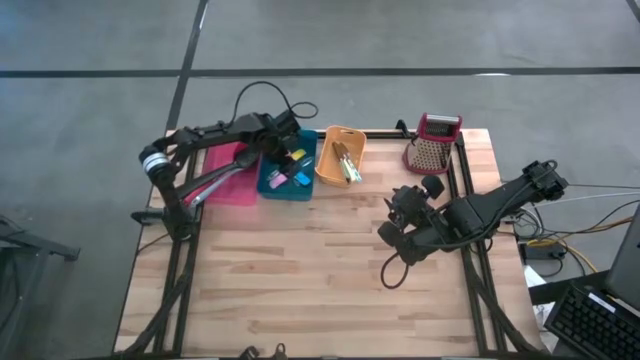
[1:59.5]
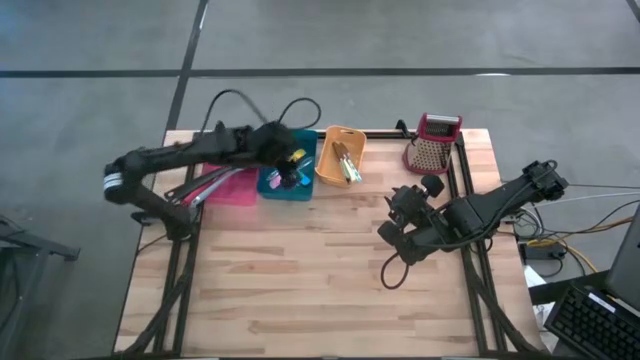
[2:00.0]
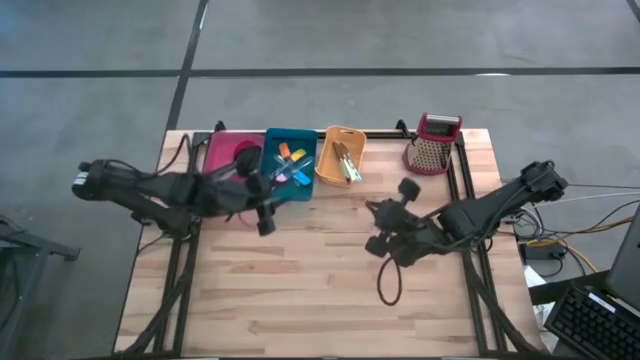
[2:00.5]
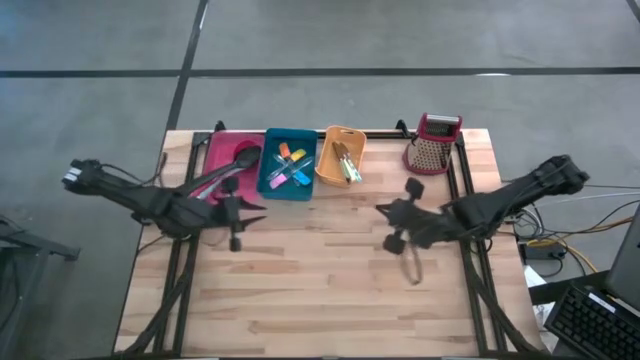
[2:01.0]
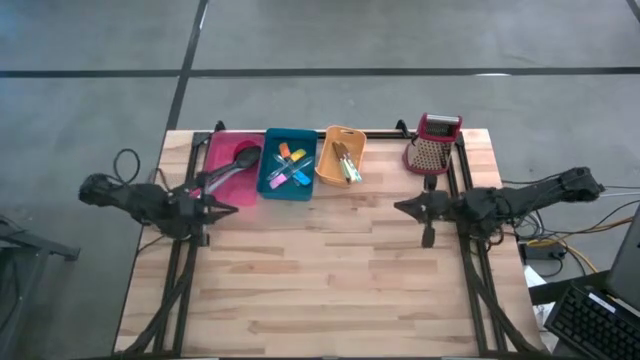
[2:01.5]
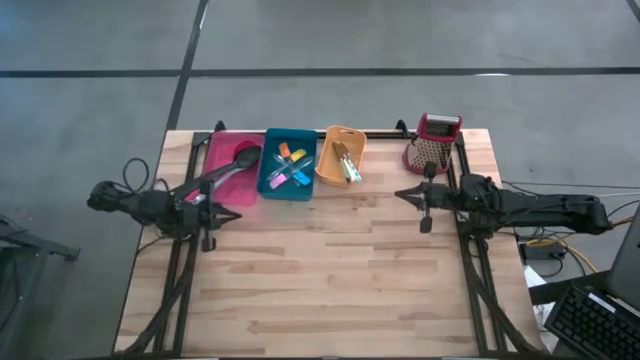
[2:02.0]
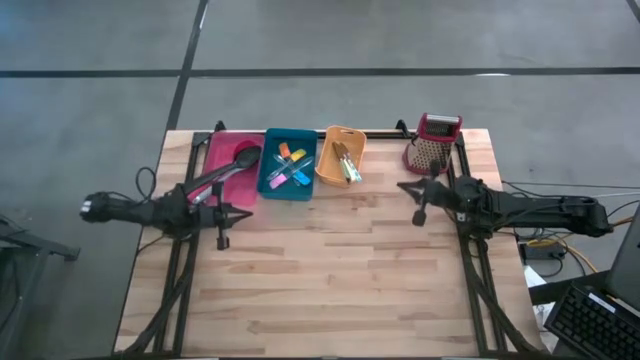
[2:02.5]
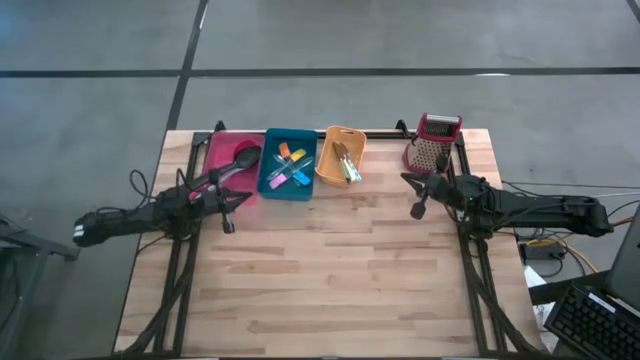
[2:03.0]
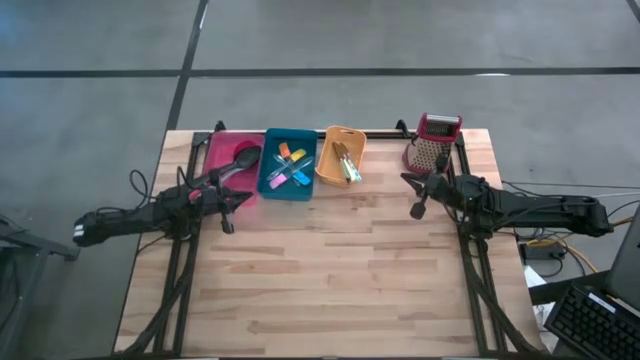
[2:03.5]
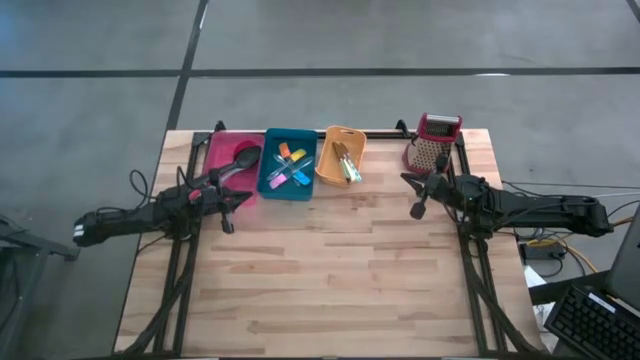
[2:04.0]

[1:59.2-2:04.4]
Task: Pick & Place Kitchen Items
Return to Home Position

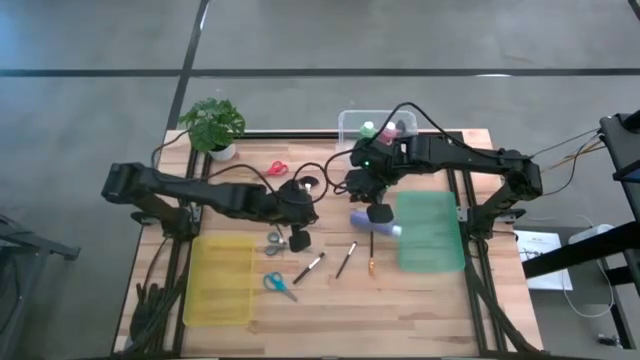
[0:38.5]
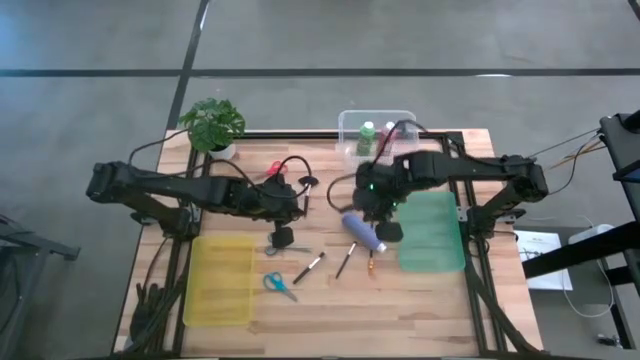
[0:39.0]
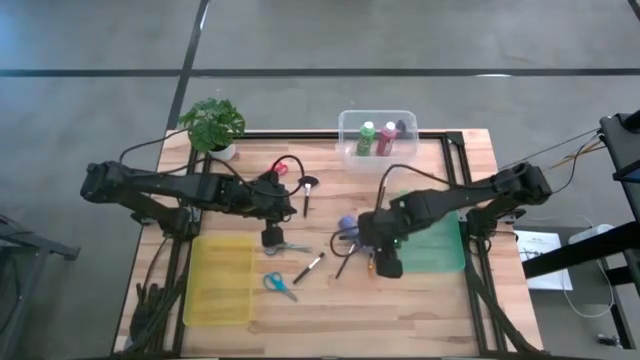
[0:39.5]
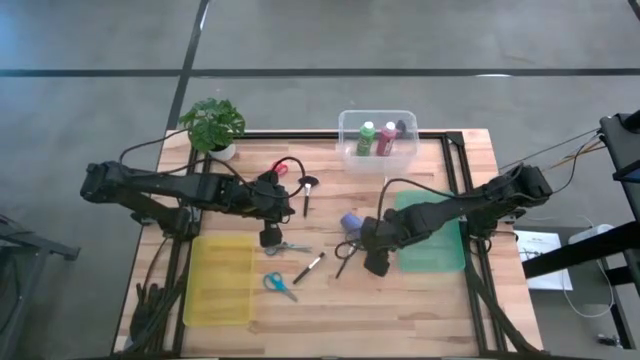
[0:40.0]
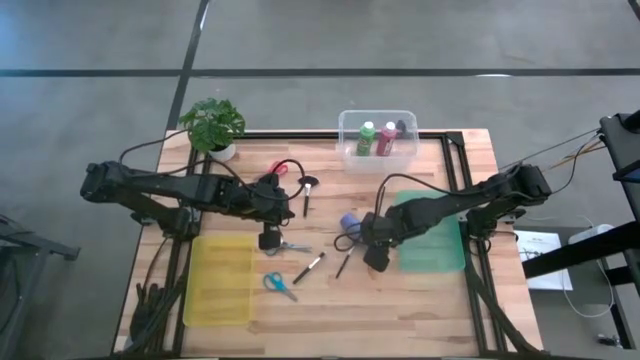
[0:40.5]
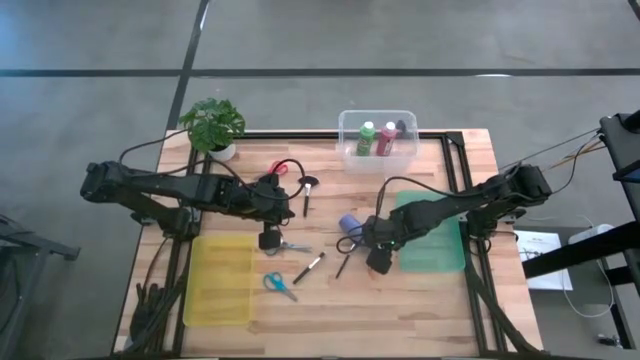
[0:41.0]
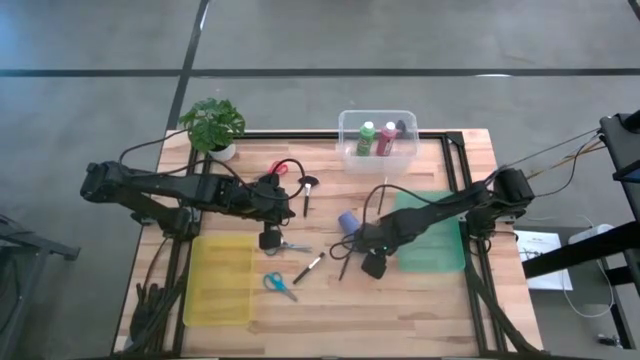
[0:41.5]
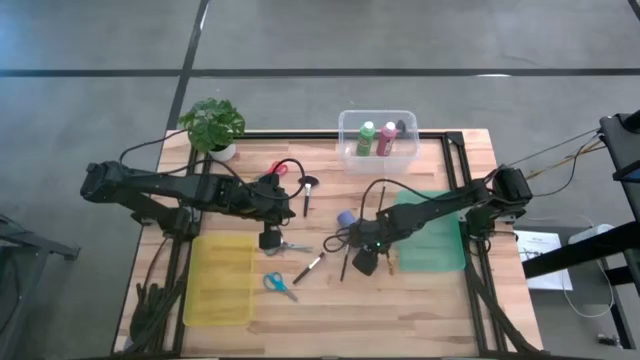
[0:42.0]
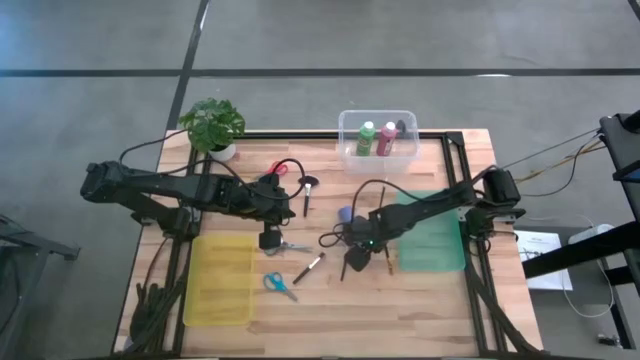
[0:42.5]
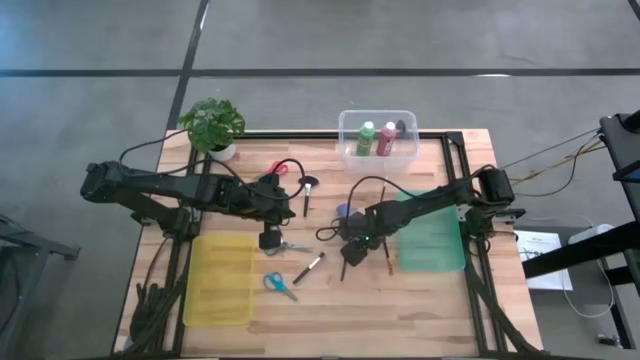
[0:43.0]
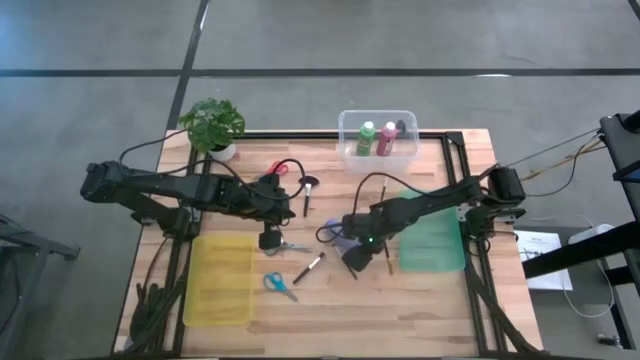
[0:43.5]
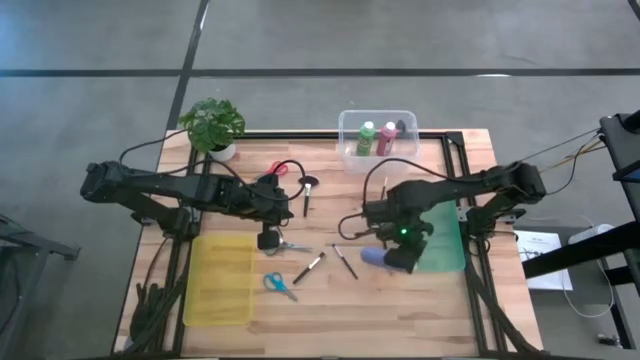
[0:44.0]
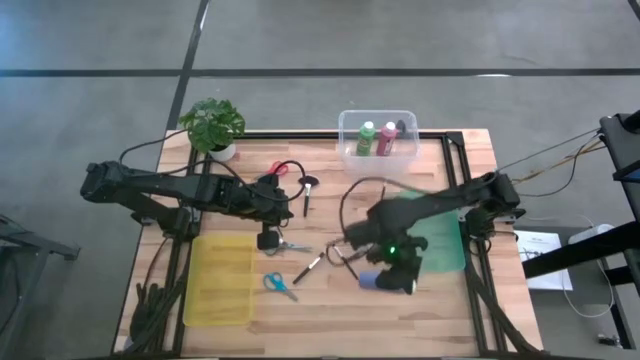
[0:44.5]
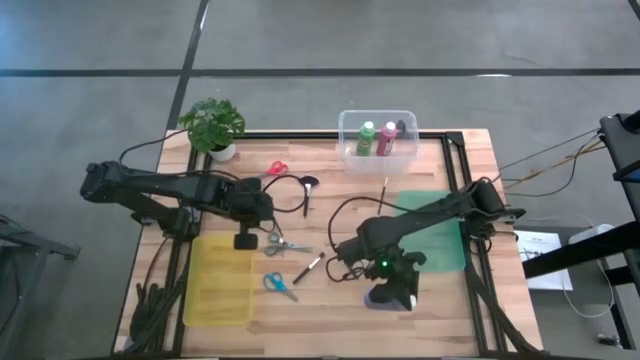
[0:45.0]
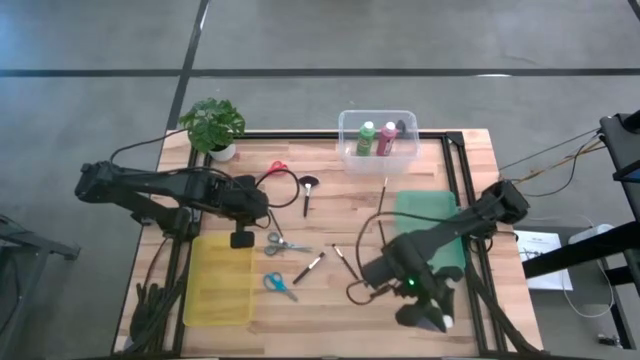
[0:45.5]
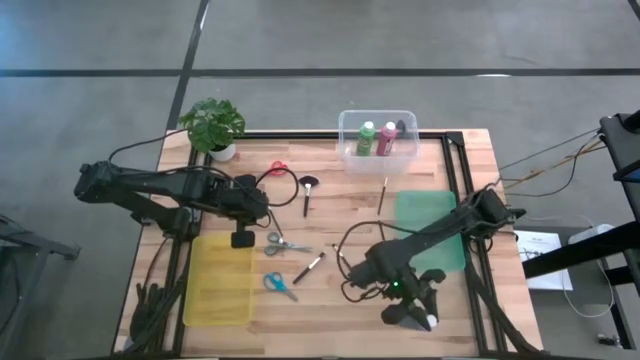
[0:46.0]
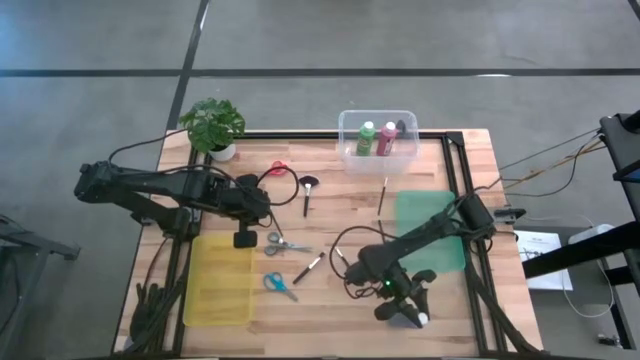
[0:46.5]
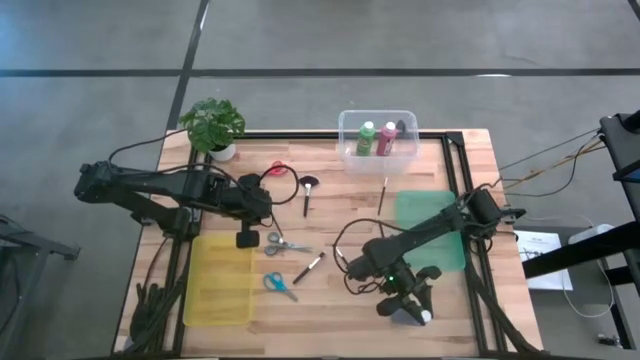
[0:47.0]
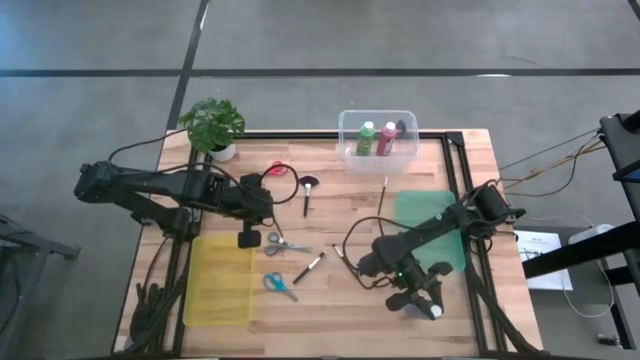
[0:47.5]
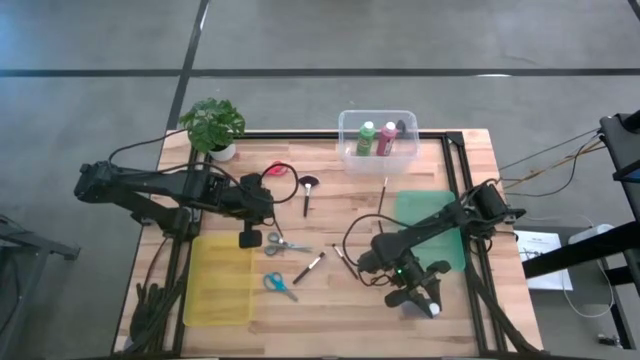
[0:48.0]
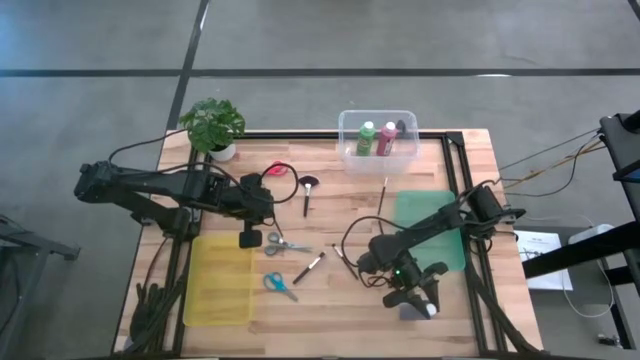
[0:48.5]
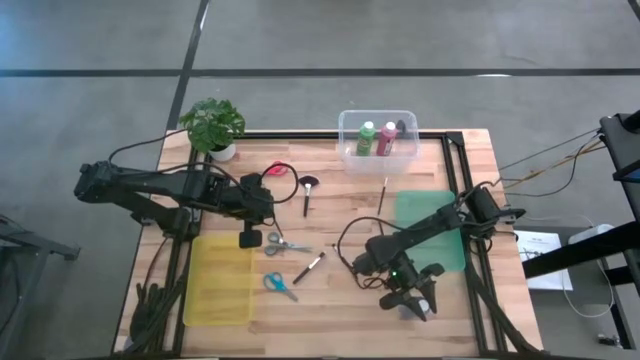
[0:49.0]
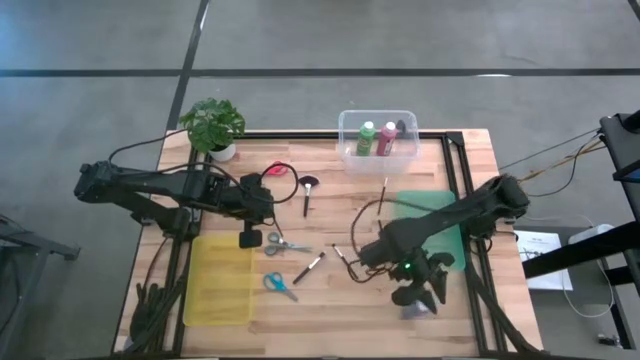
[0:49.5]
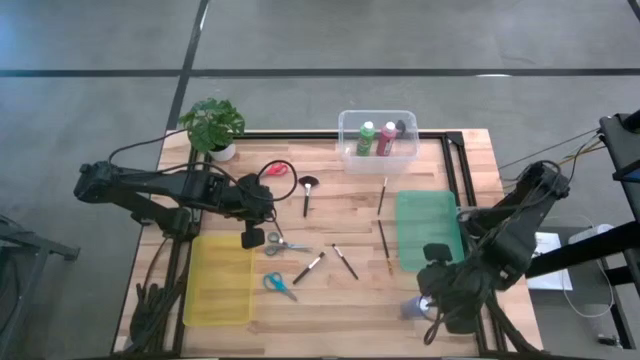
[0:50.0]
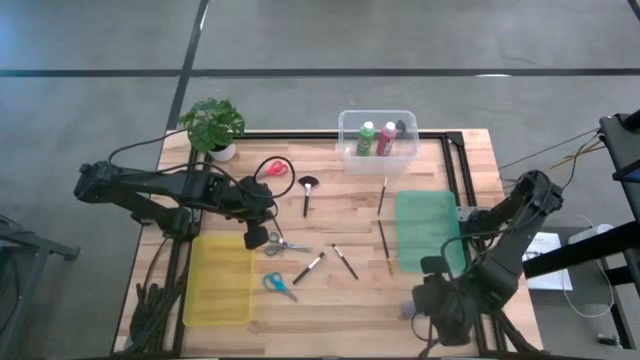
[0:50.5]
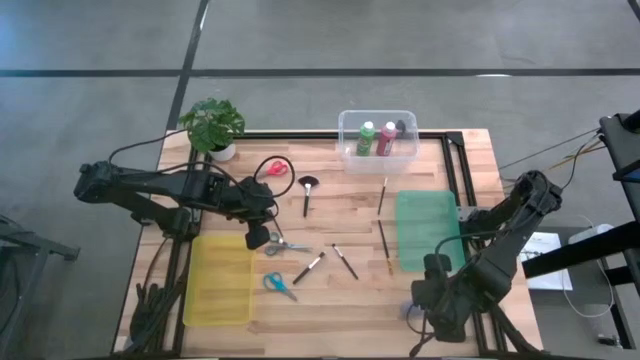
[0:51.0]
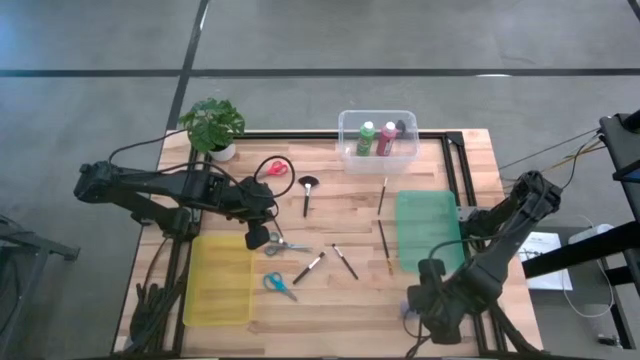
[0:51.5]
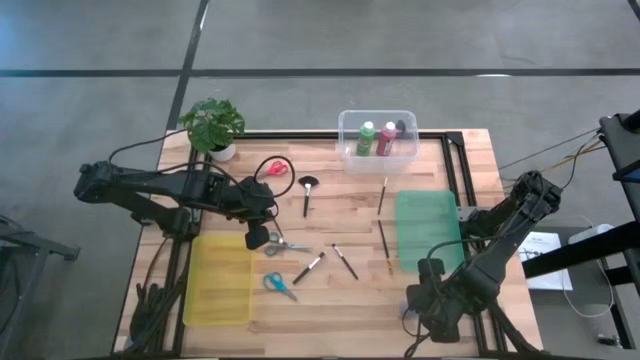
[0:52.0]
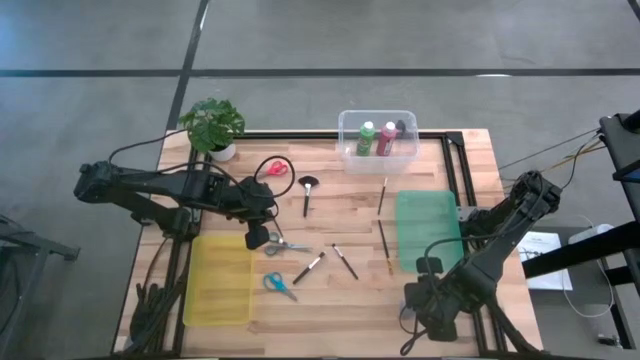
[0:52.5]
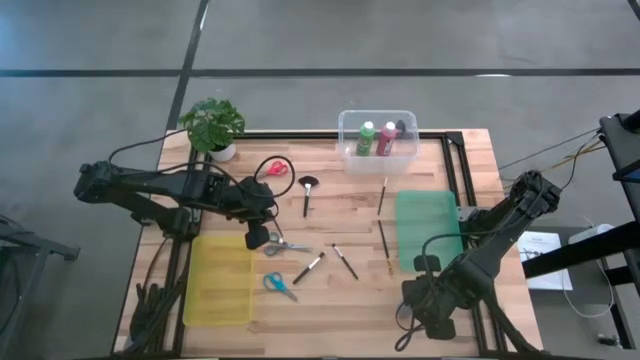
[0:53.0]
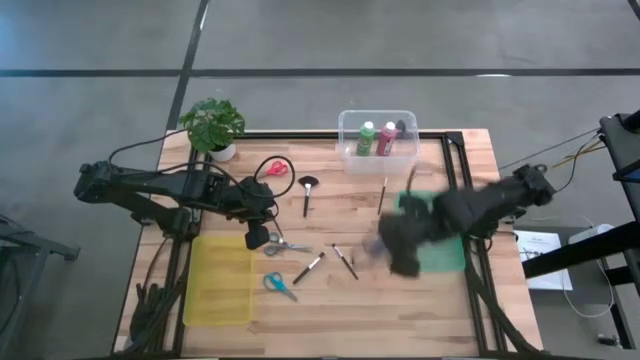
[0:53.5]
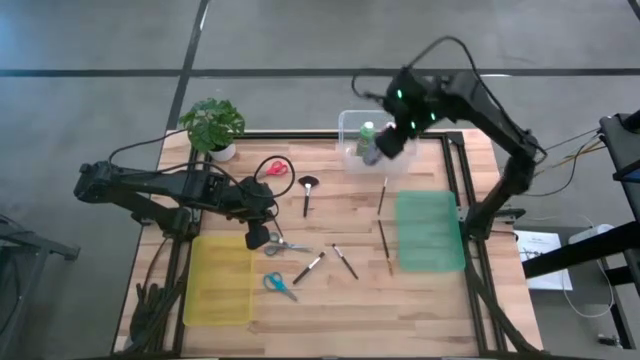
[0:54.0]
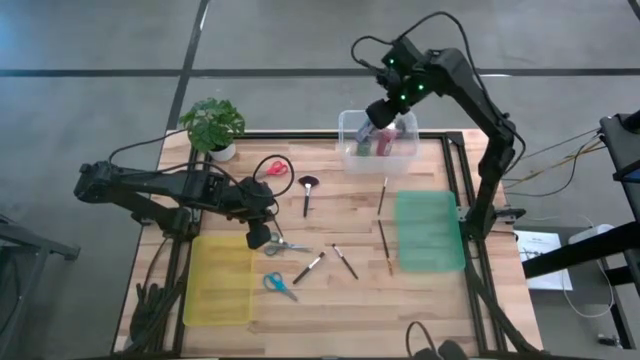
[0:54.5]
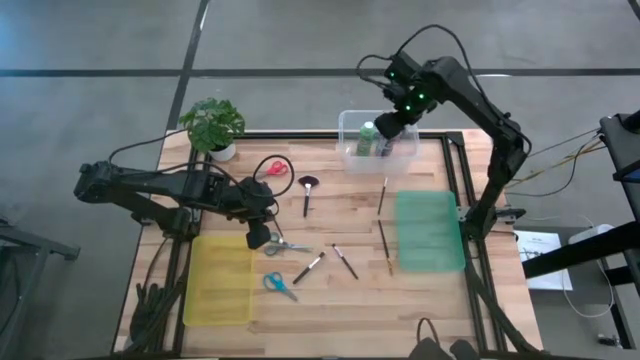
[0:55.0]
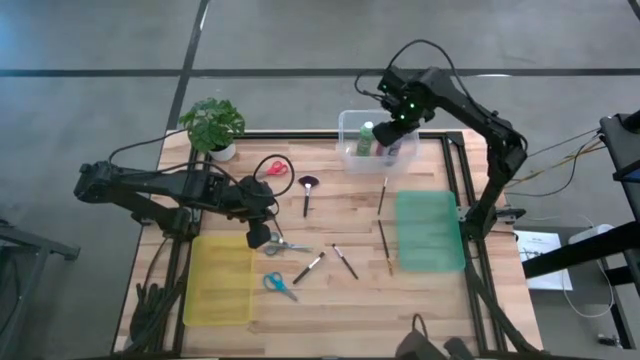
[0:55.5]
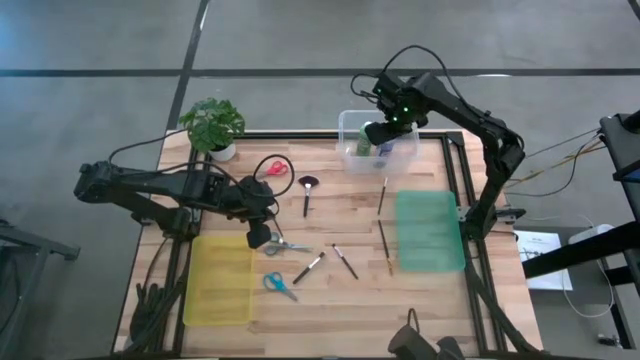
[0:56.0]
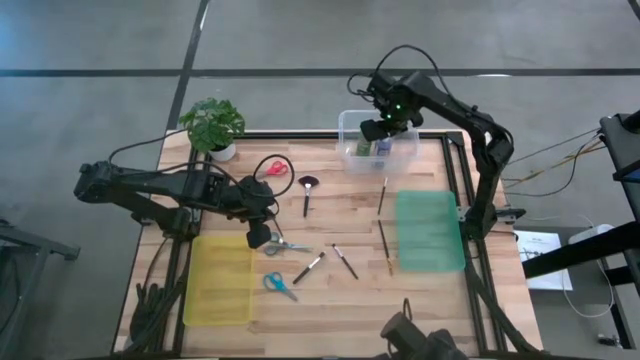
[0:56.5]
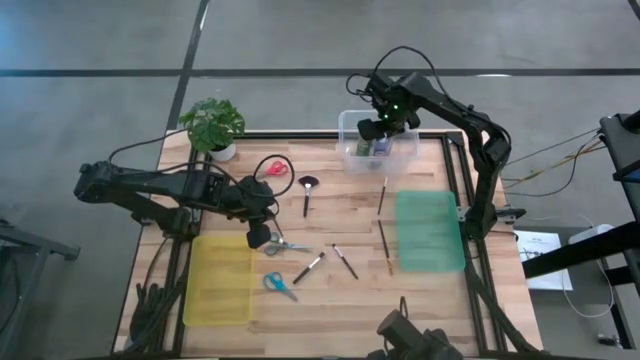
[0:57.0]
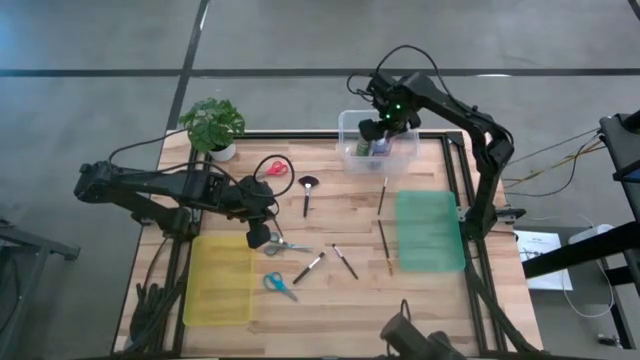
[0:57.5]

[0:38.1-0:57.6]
Task: Pick & Place Paint Supplies
Put the blue paint bottle into the transparent bin
